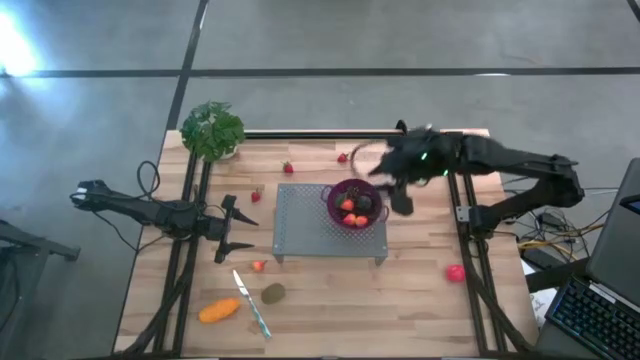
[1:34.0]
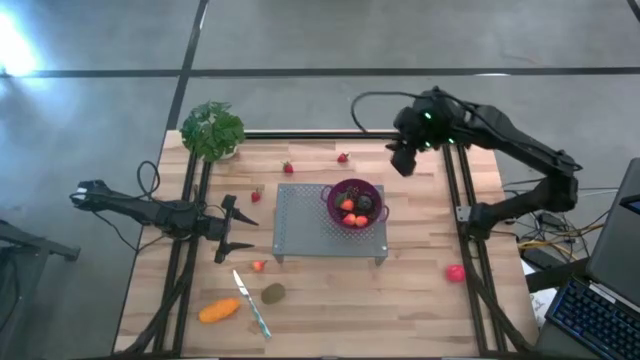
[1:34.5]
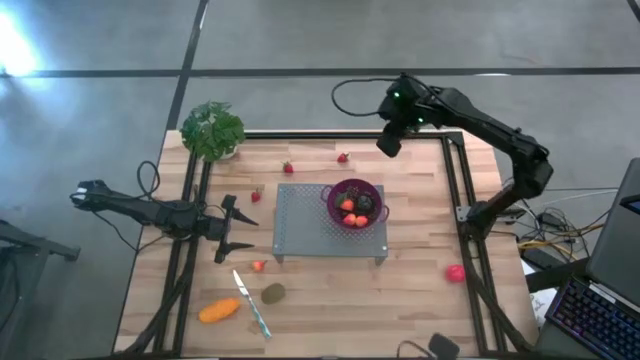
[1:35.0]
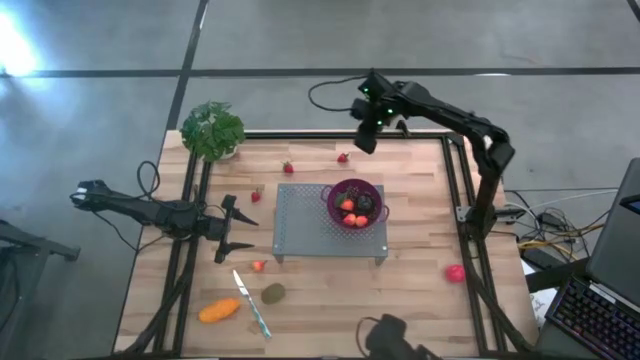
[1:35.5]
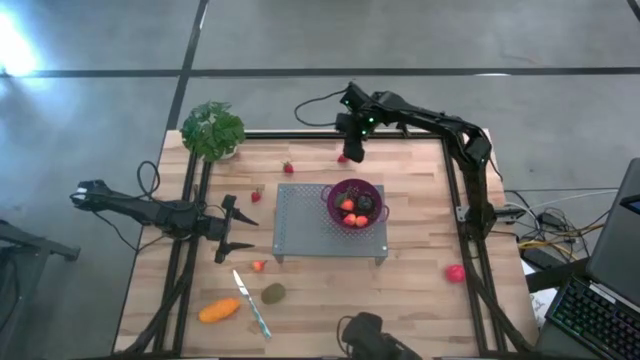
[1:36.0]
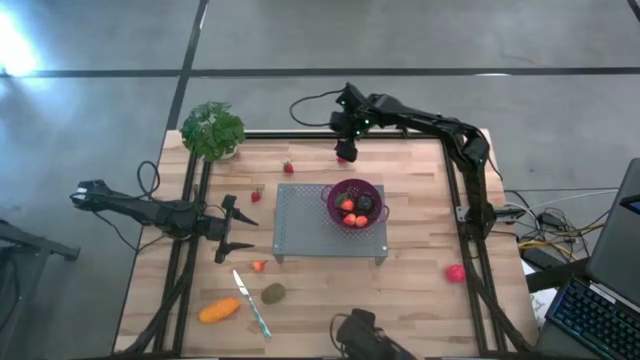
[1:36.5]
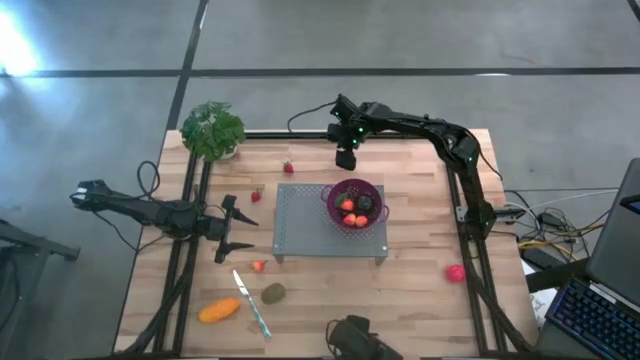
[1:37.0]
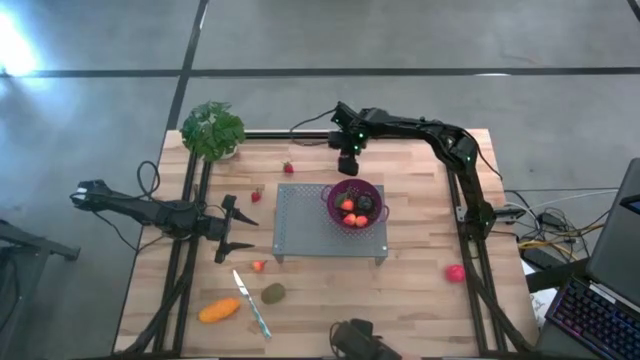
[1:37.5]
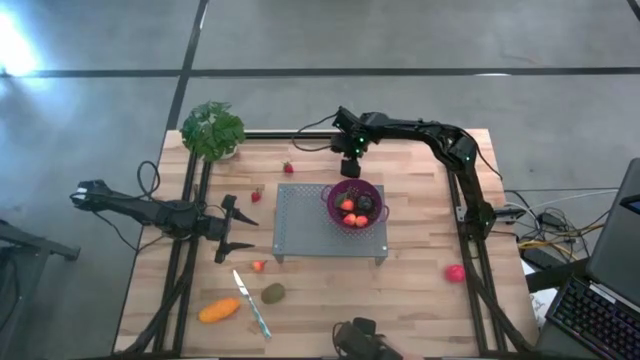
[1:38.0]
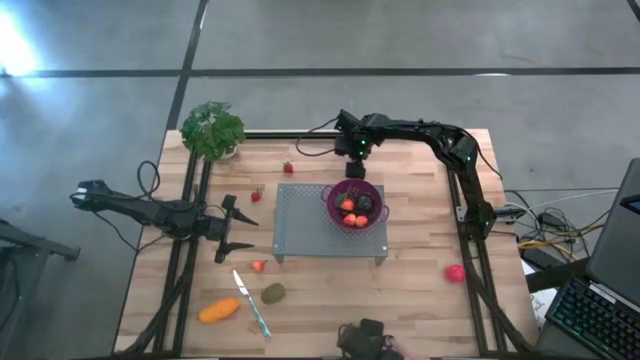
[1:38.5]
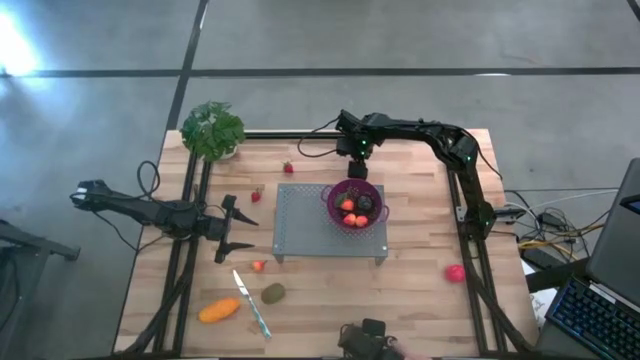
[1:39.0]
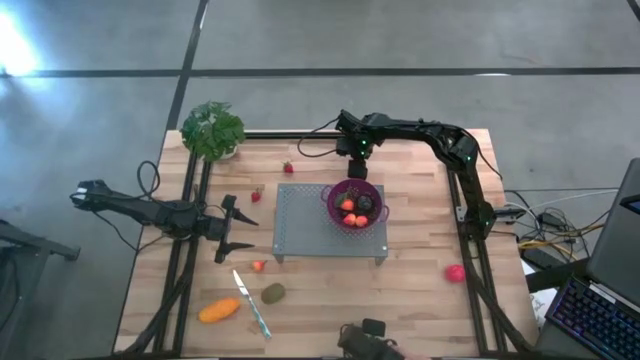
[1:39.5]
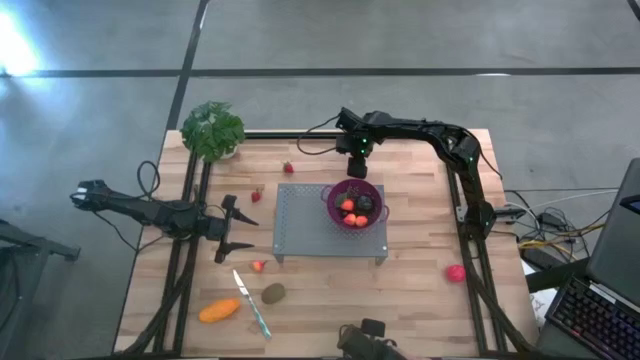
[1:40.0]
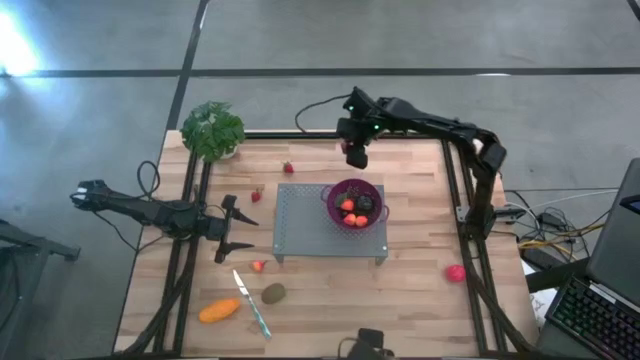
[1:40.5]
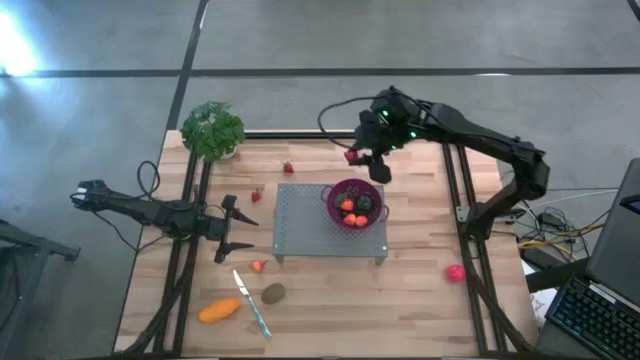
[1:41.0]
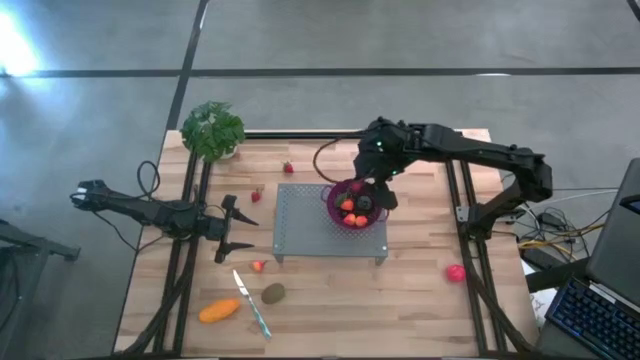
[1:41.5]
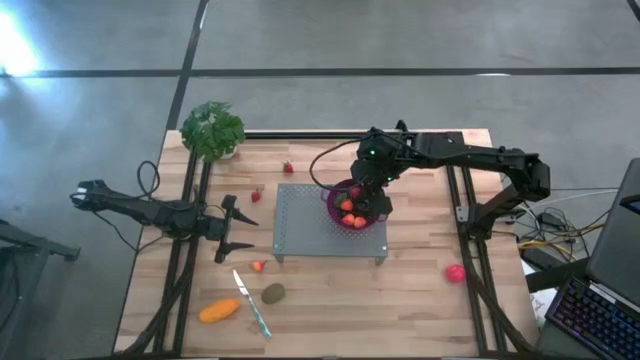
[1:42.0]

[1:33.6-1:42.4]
Task: Pick & Place Fruit
Put the strawberry in the purple strainer bowl on the shelf

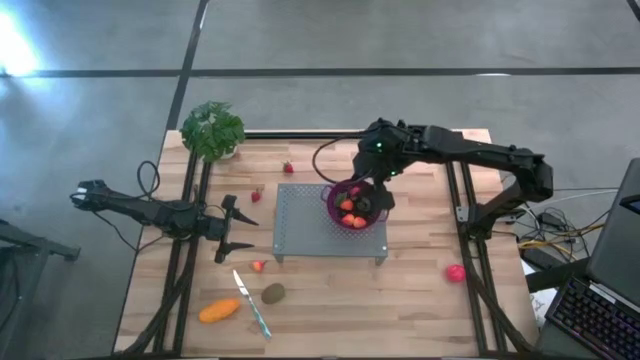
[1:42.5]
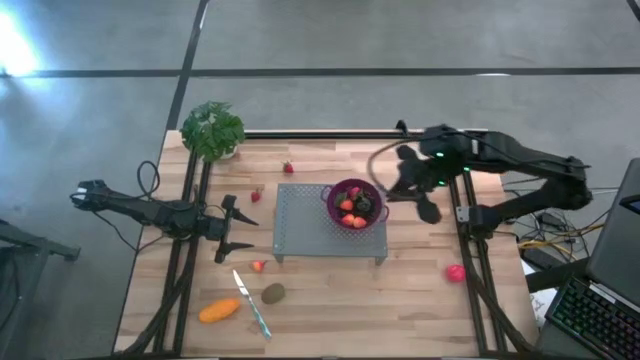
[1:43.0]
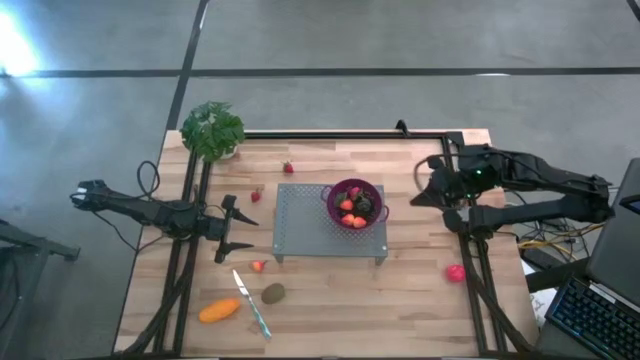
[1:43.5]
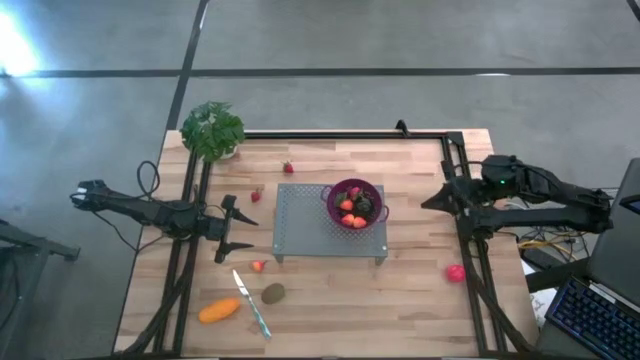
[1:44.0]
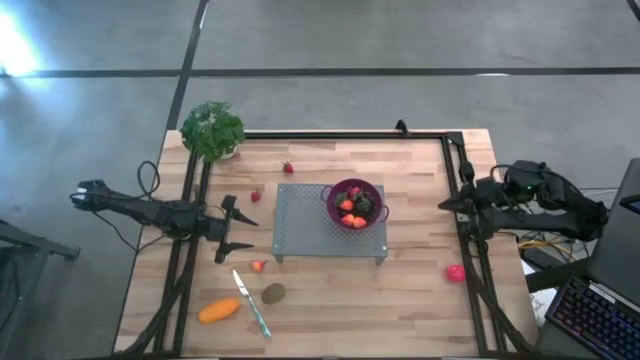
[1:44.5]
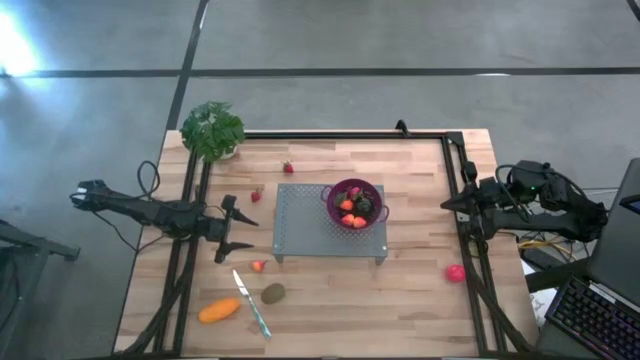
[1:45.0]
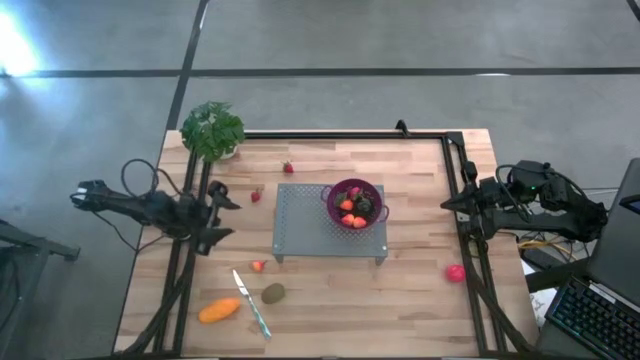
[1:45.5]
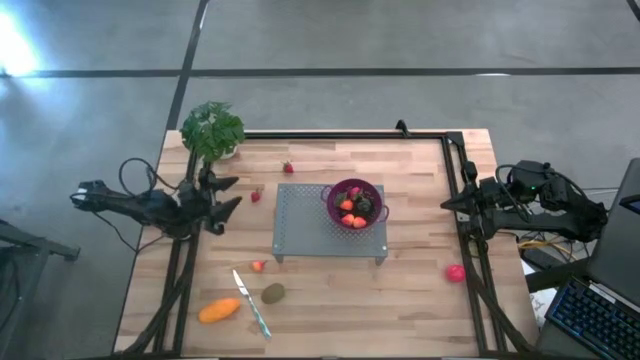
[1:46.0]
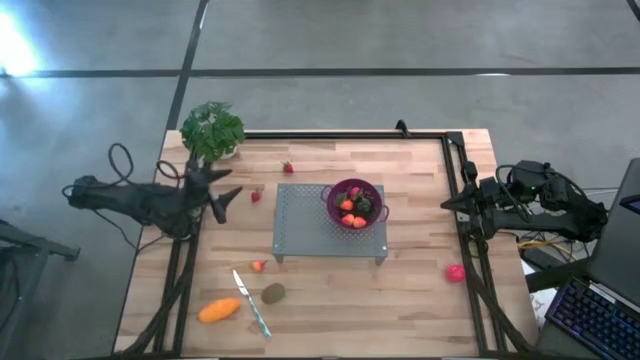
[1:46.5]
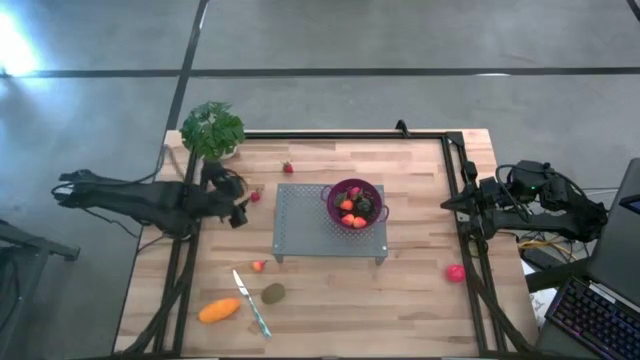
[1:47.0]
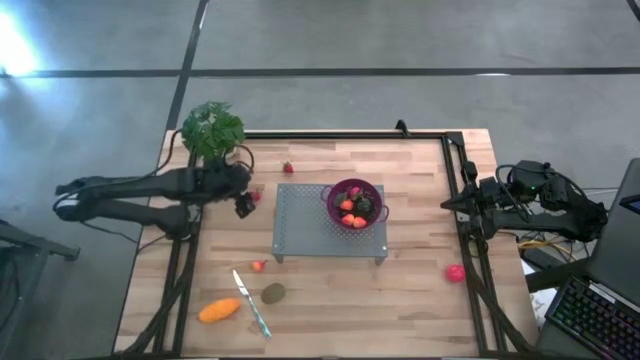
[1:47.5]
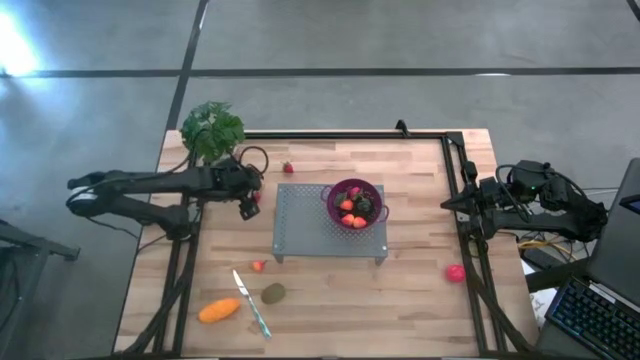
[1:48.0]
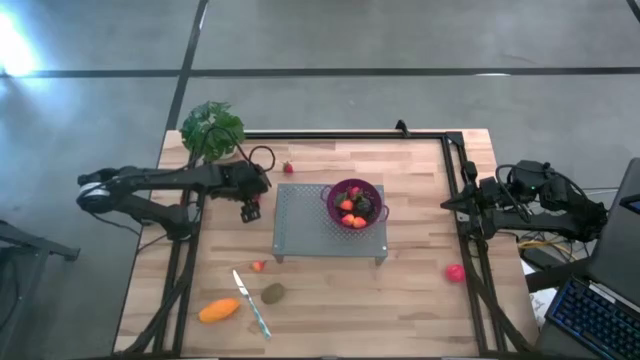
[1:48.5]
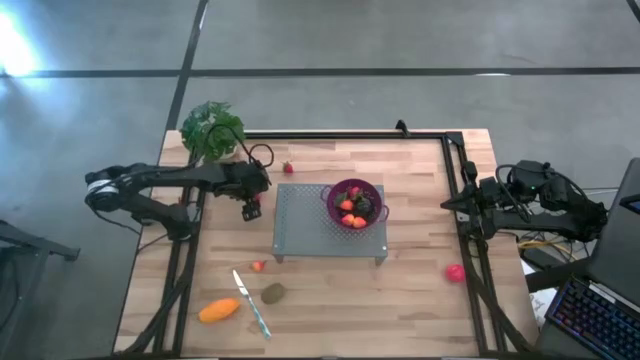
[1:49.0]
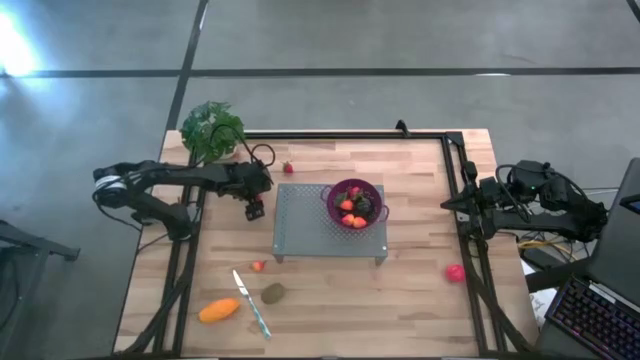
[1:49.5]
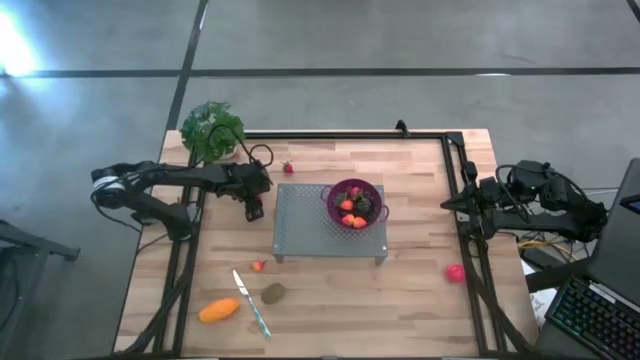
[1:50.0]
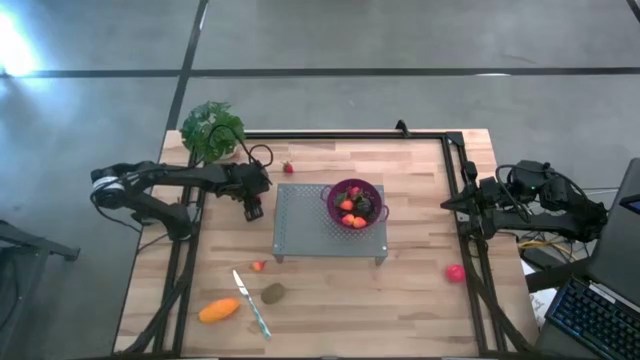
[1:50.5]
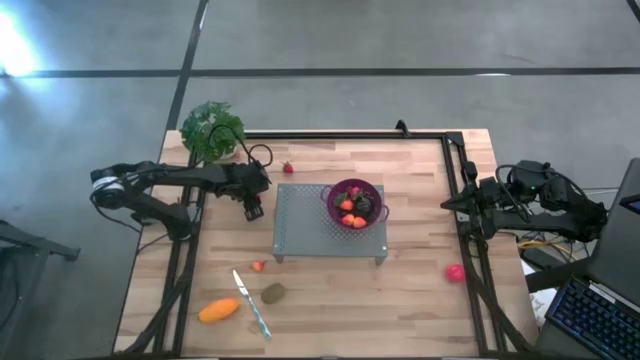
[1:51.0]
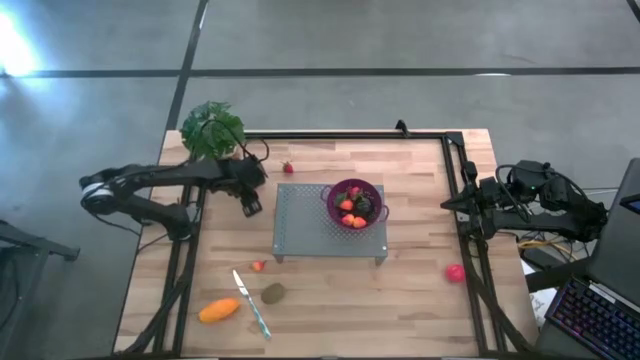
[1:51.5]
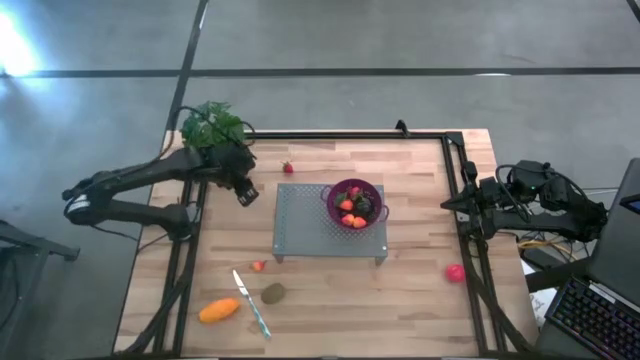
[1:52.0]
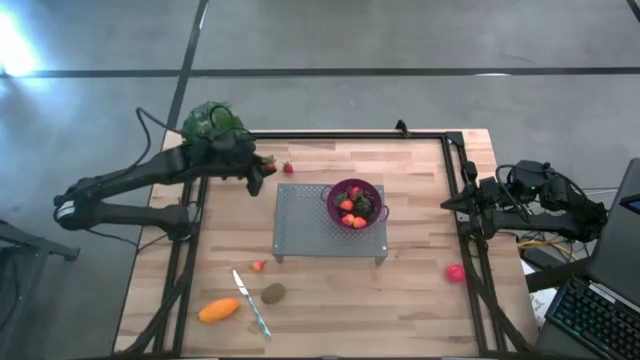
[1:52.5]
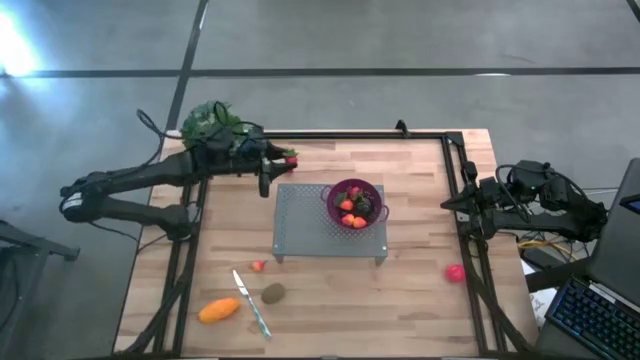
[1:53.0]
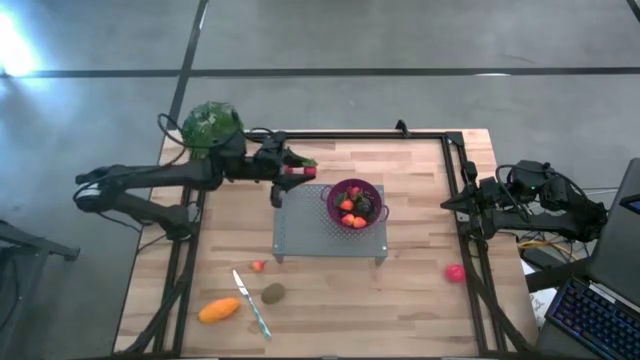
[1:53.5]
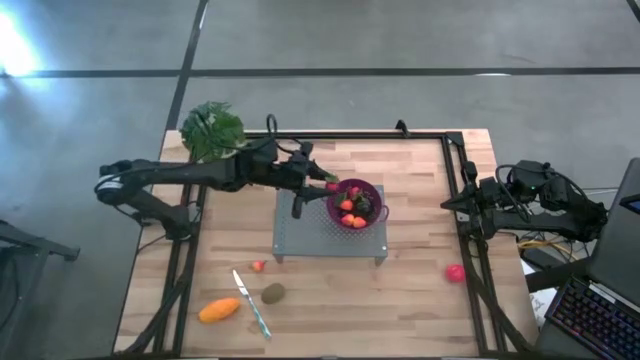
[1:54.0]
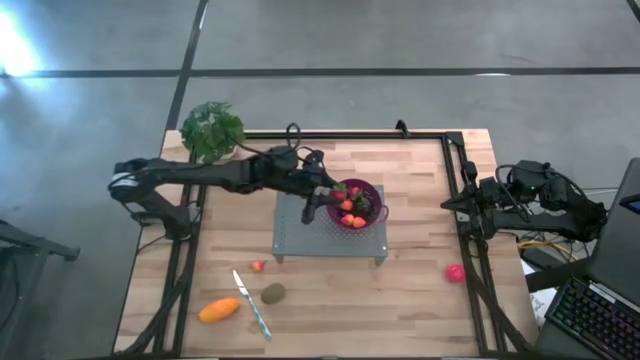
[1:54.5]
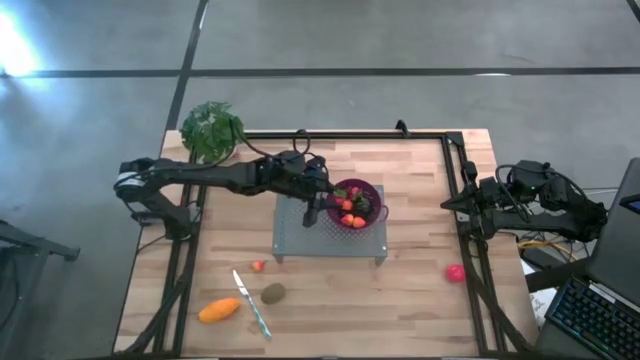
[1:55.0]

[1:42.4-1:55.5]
Put the strawberry in the purple strainer bowl on the shelf
